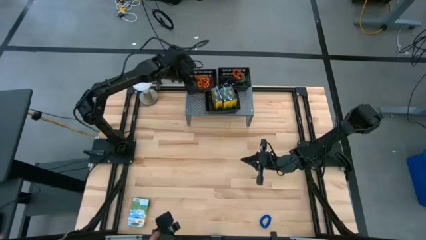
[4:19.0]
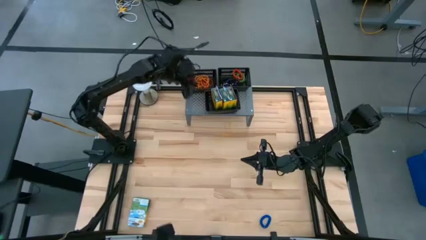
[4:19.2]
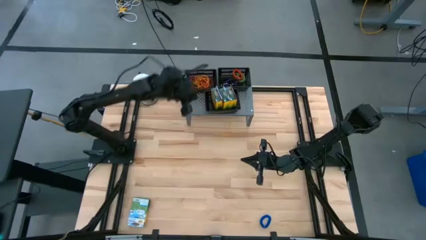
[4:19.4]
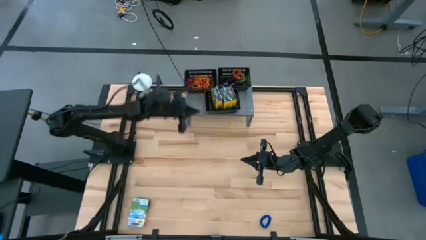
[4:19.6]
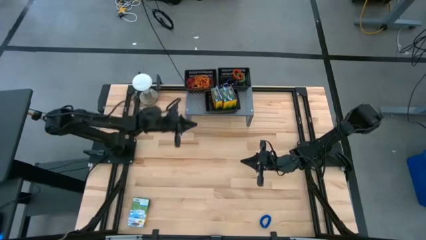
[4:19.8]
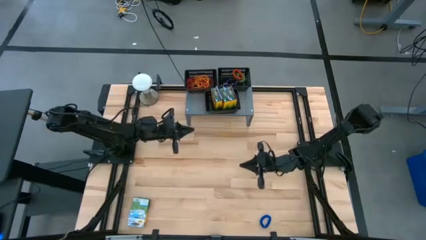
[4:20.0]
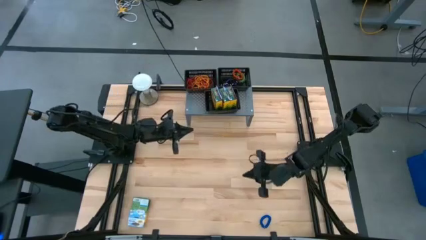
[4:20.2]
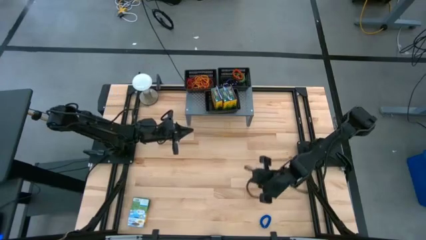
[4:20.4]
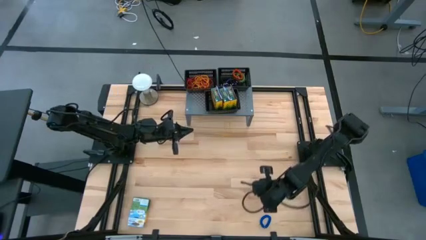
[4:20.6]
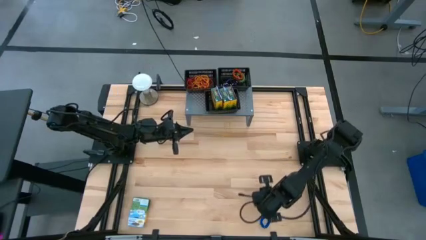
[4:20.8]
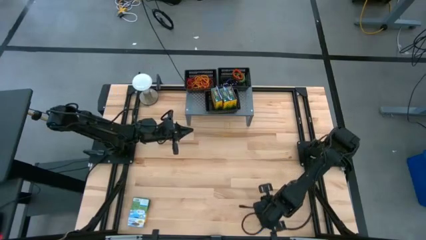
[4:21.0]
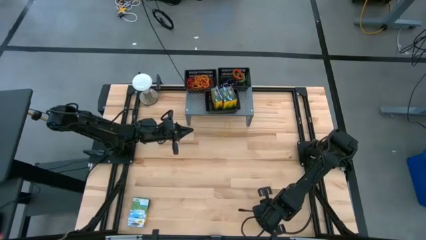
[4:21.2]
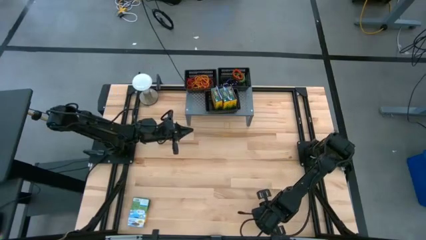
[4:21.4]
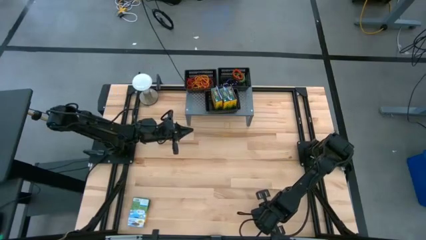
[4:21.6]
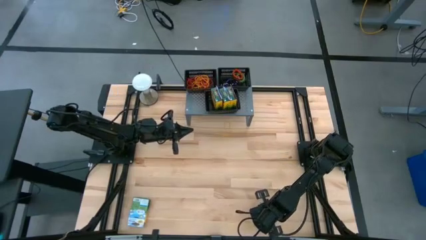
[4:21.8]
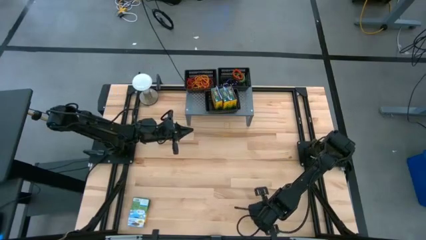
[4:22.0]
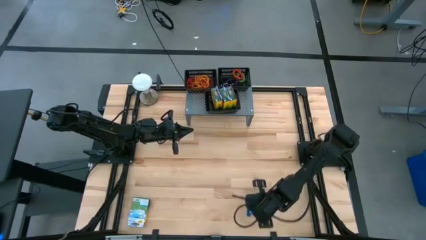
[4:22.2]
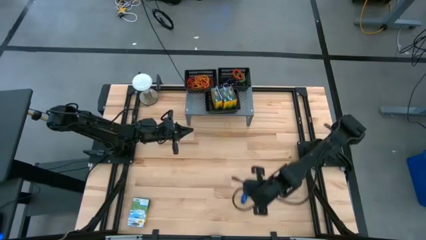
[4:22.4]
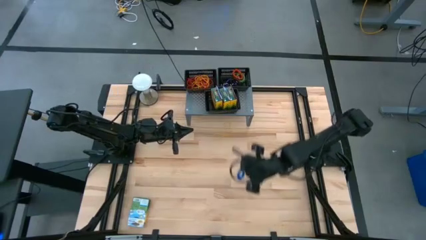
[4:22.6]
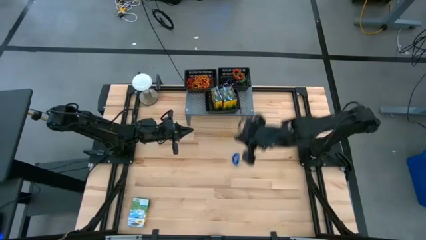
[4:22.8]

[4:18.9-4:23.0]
Task: Pick & Place Office Desk Supplies
Put the blue spring keychain into the top right black basket on the shelf

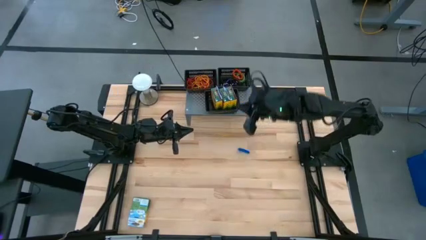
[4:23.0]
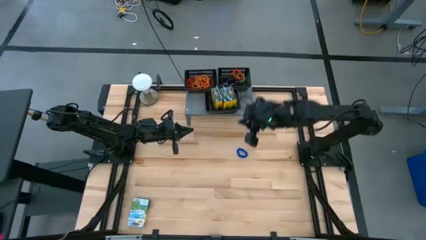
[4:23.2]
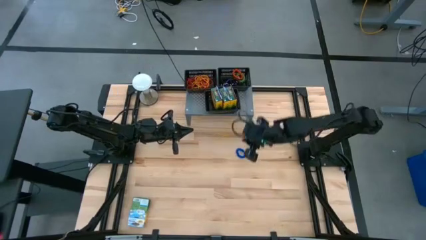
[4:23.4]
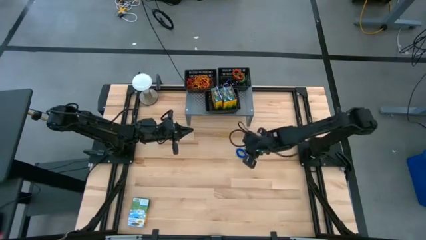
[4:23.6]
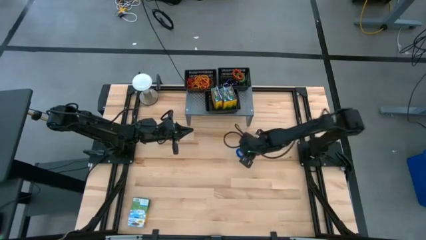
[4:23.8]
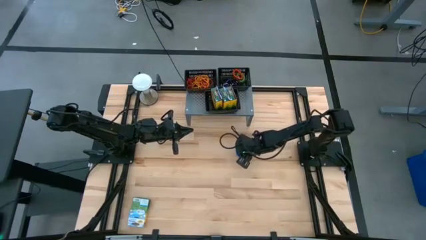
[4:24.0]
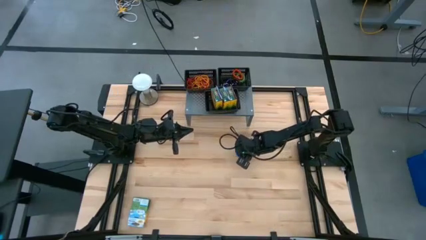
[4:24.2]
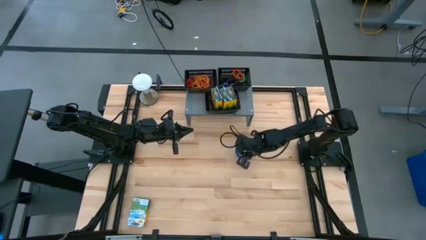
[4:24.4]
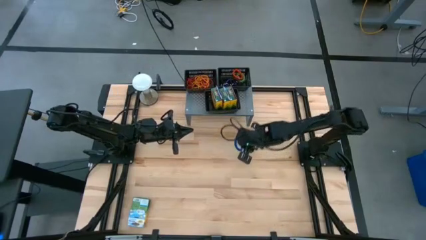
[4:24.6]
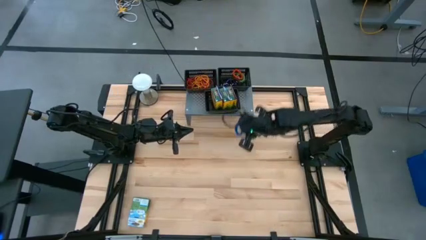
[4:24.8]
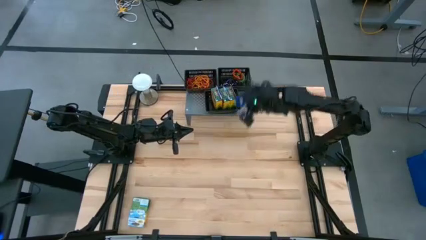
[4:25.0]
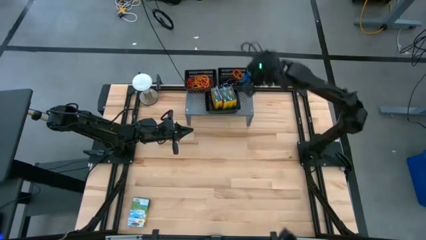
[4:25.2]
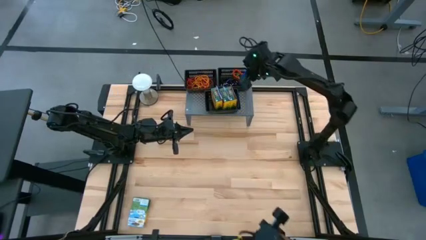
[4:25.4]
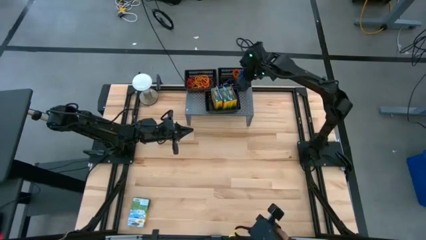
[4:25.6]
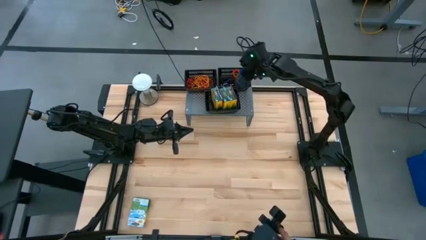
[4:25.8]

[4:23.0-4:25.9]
Put the blue spring keychain into the top right black basket on the shelf

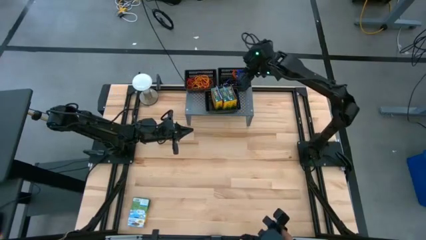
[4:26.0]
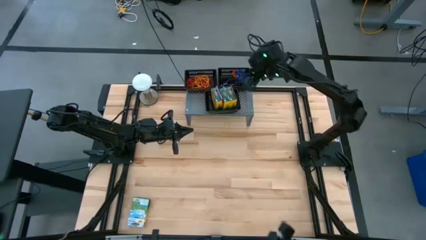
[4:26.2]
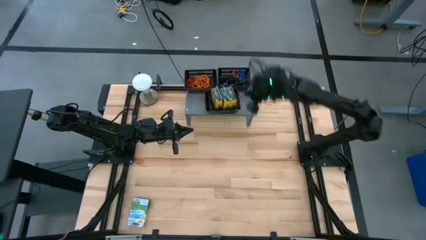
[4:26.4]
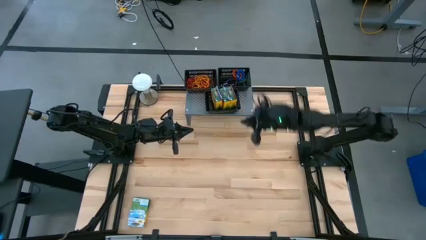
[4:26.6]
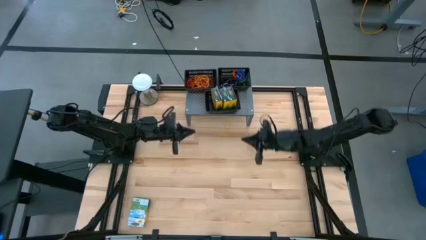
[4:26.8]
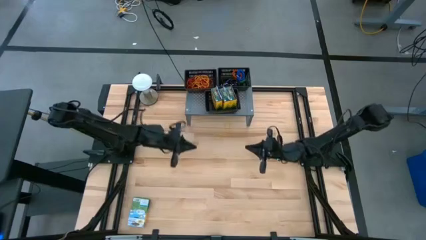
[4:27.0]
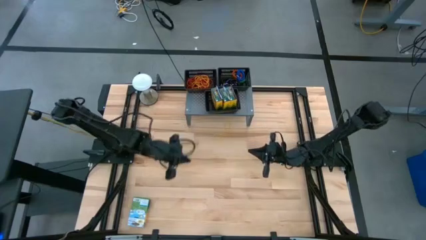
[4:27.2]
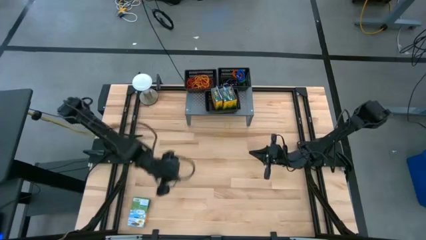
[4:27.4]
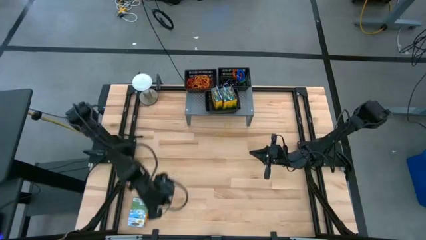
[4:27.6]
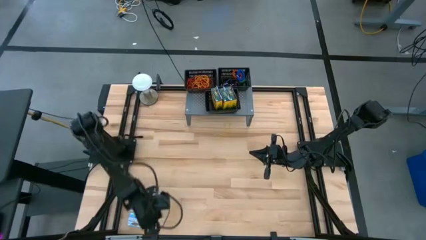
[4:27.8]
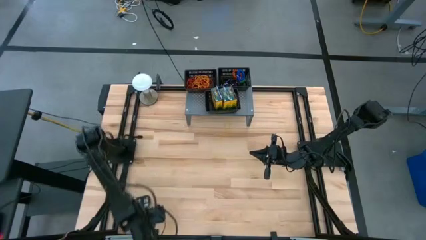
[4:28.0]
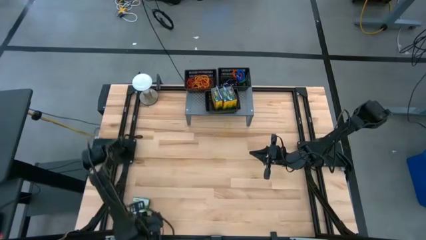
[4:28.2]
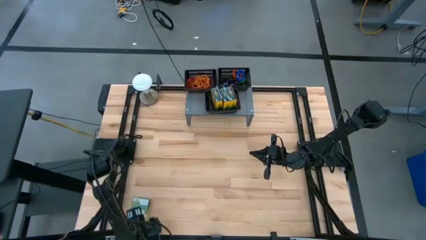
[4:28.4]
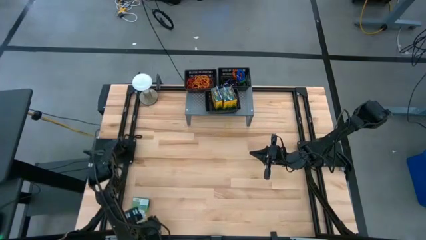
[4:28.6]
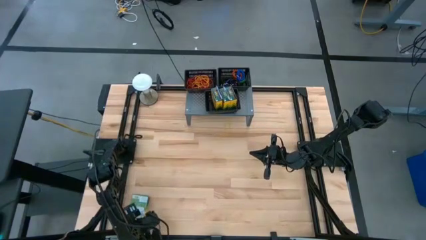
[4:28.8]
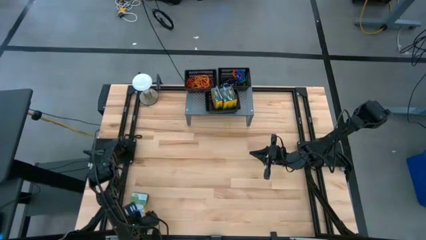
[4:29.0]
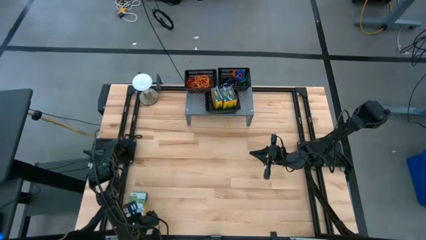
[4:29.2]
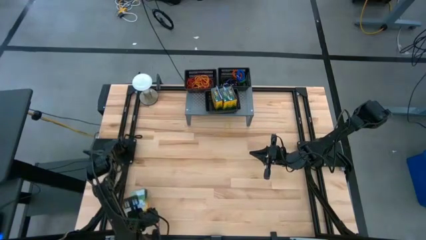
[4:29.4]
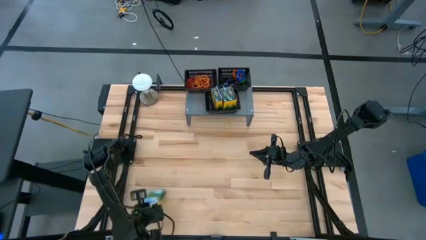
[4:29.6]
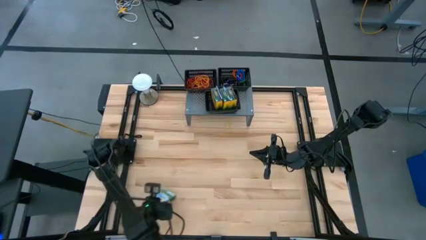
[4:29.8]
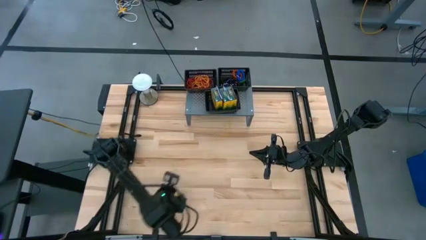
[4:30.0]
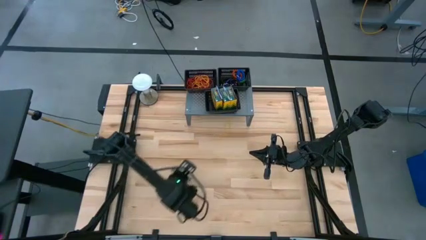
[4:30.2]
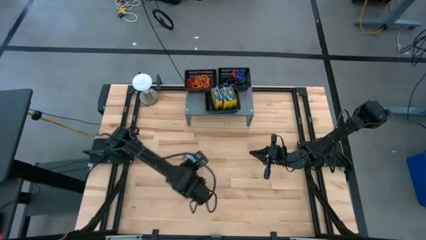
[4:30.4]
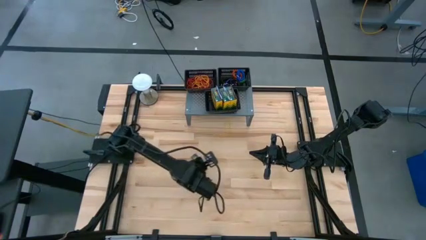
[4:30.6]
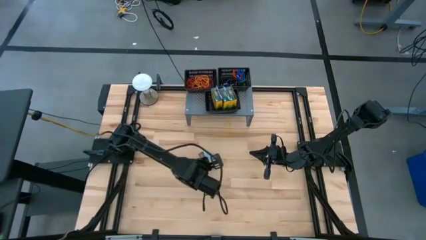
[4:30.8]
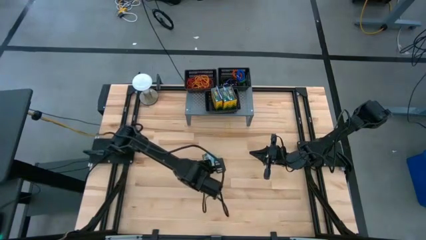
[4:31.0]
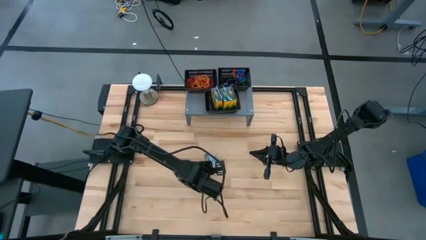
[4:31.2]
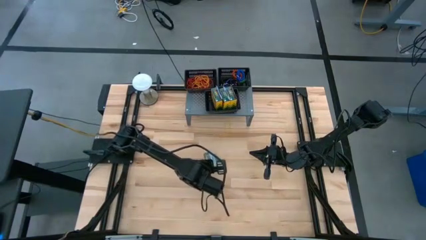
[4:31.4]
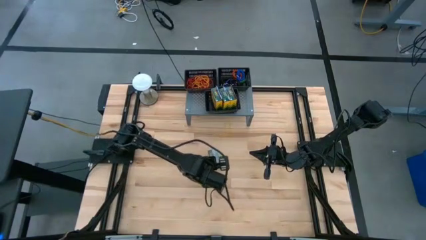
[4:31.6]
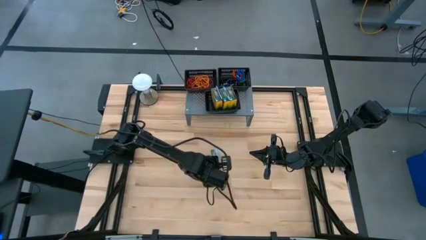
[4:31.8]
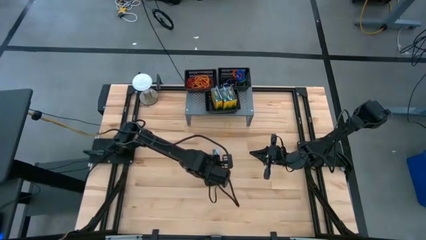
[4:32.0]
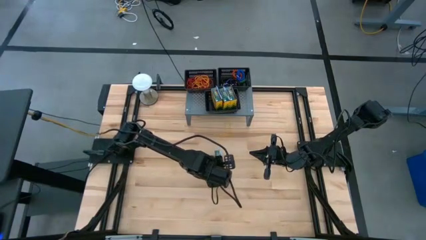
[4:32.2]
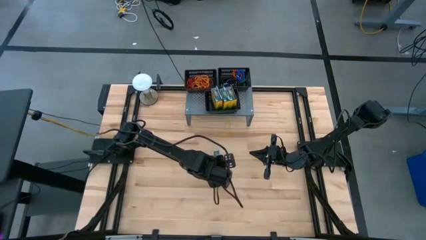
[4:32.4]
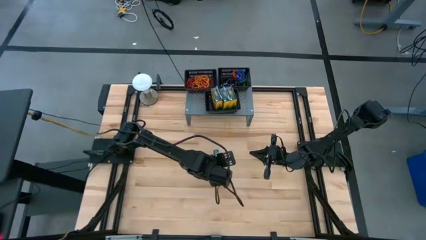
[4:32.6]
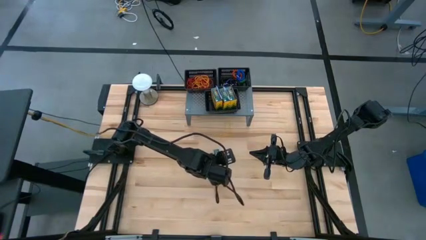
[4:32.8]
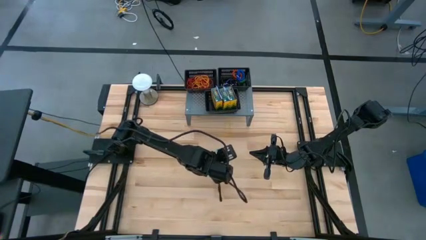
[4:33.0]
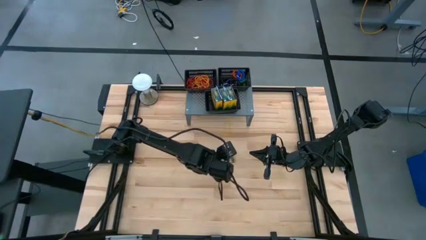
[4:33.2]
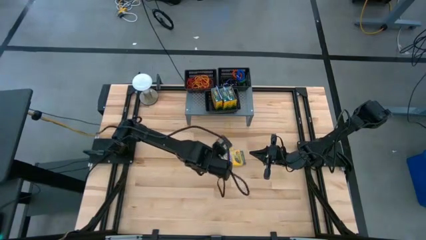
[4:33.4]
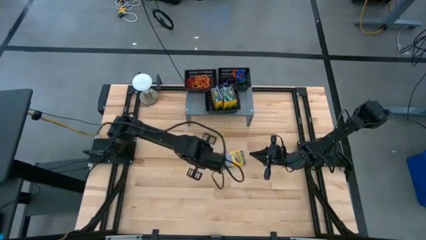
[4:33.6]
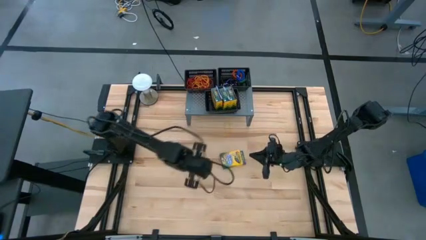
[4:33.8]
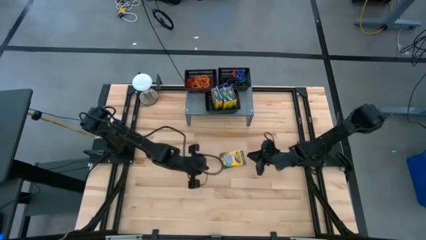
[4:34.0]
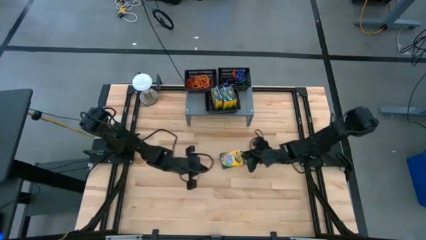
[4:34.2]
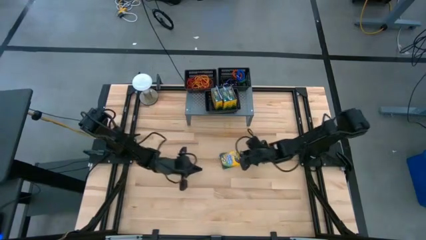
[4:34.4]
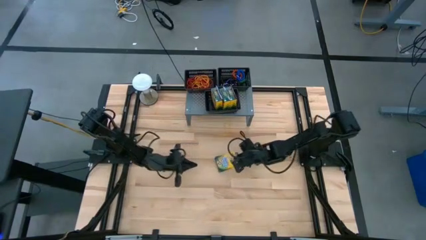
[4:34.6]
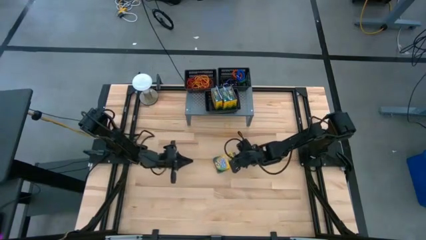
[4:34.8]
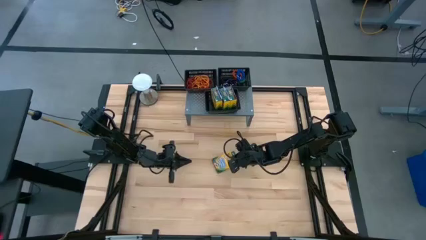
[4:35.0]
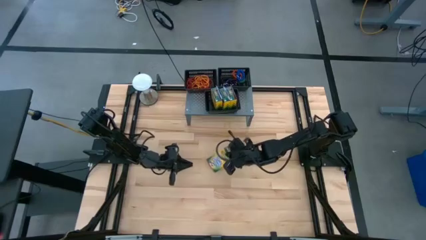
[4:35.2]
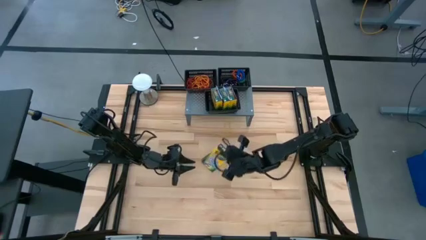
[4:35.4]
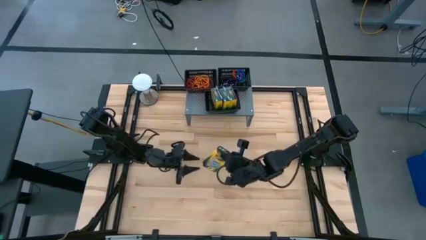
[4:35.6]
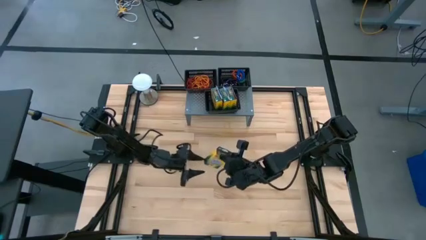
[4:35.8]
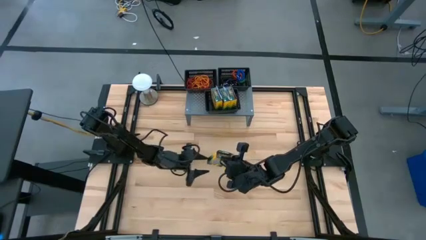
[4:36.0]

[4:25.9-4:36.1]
Put the crayon box into the bottom black basket on the shelf
